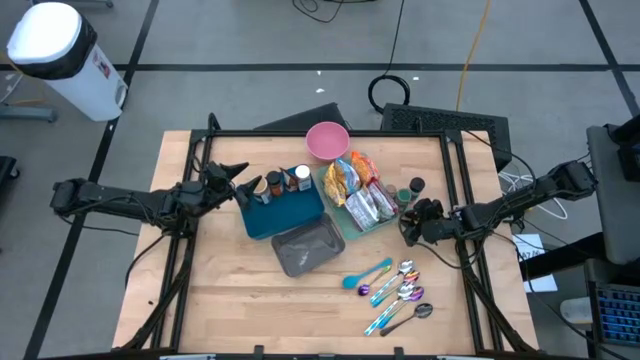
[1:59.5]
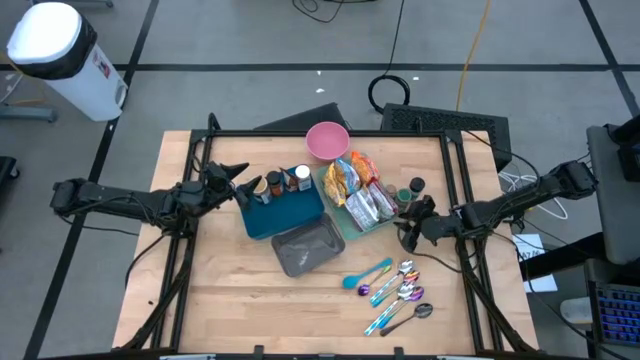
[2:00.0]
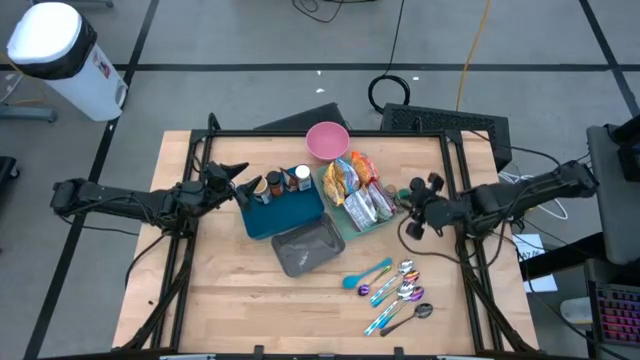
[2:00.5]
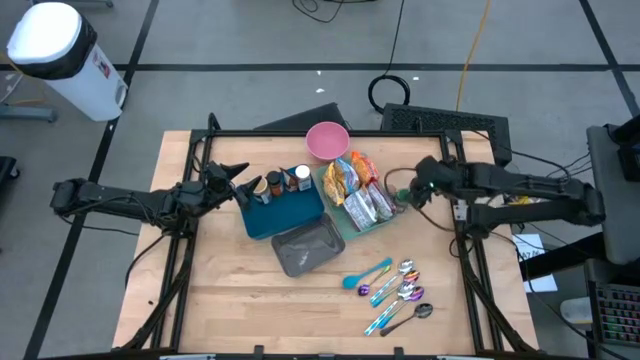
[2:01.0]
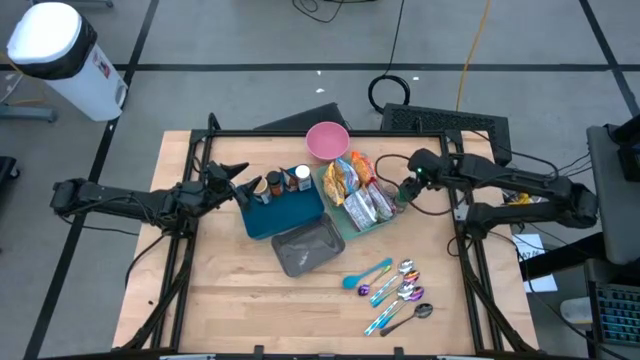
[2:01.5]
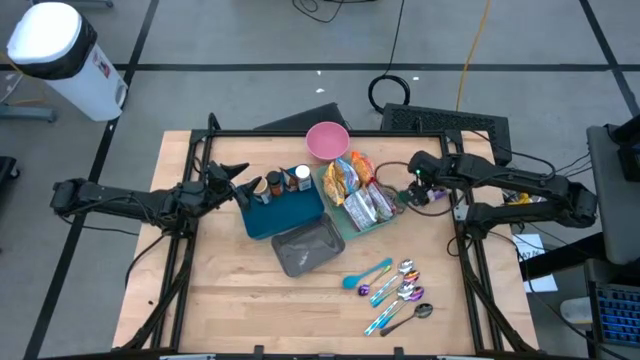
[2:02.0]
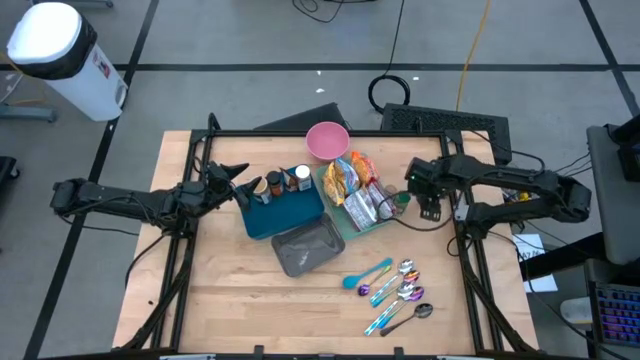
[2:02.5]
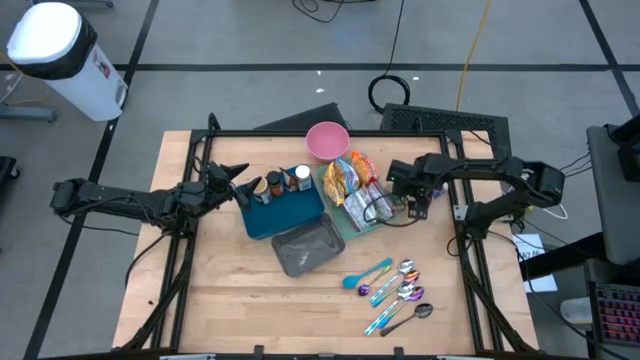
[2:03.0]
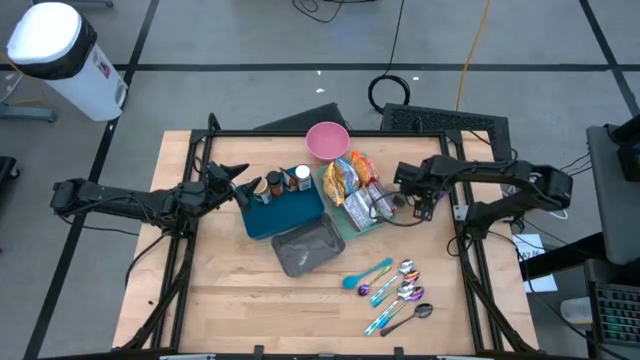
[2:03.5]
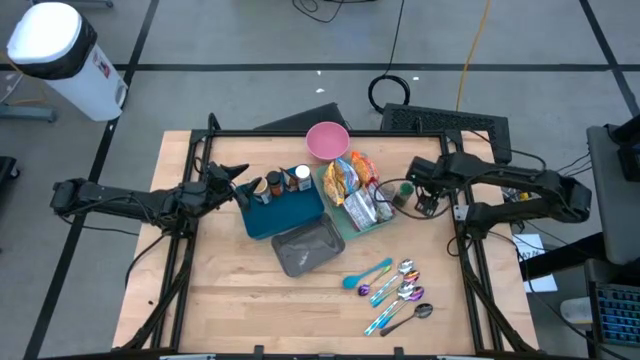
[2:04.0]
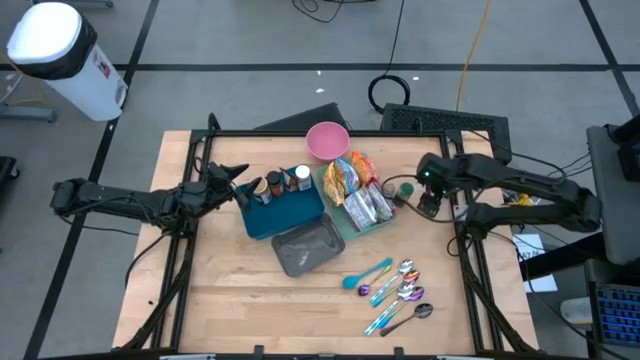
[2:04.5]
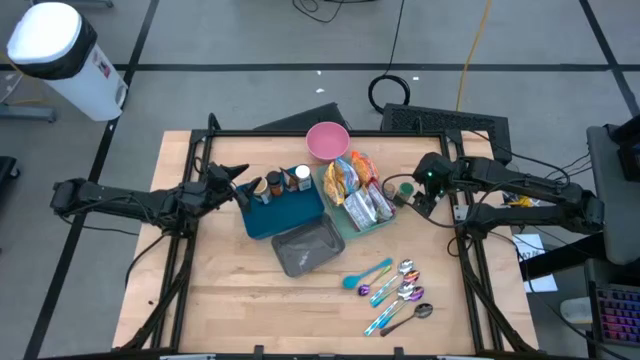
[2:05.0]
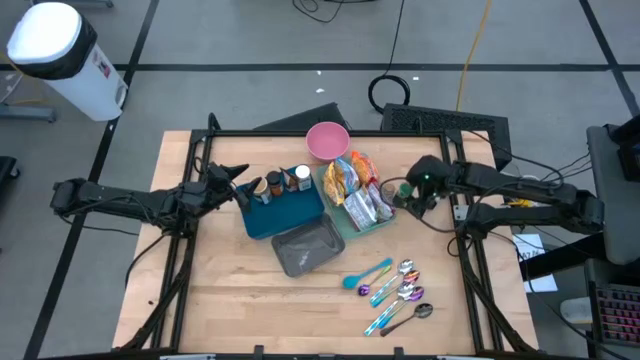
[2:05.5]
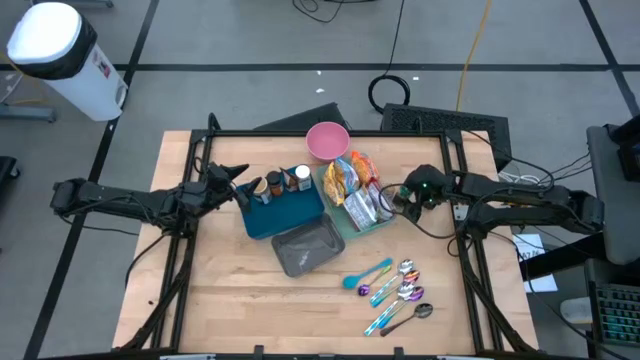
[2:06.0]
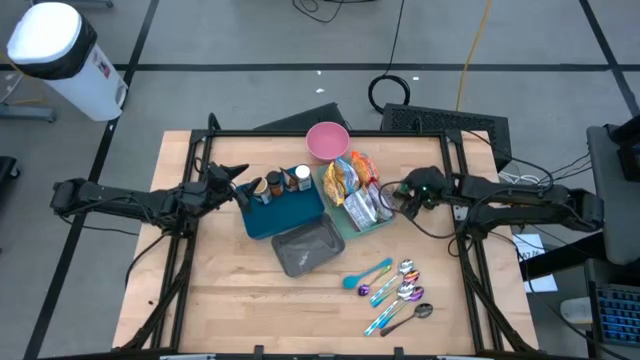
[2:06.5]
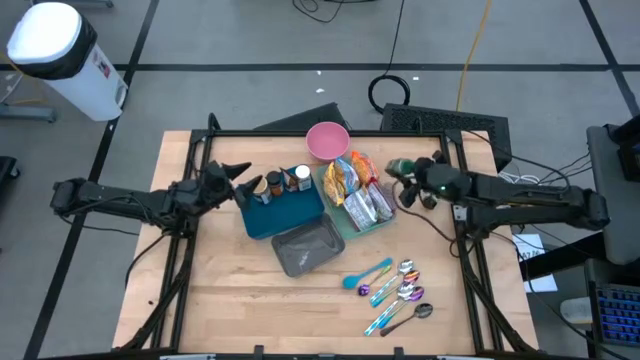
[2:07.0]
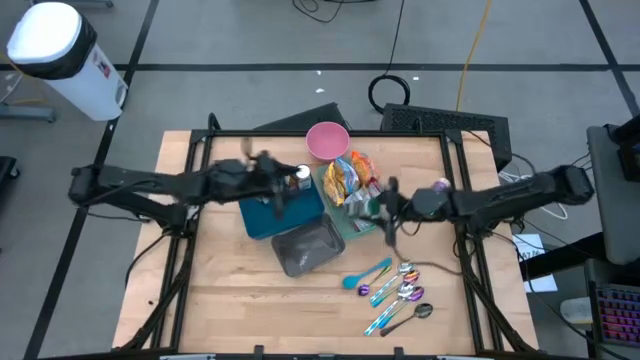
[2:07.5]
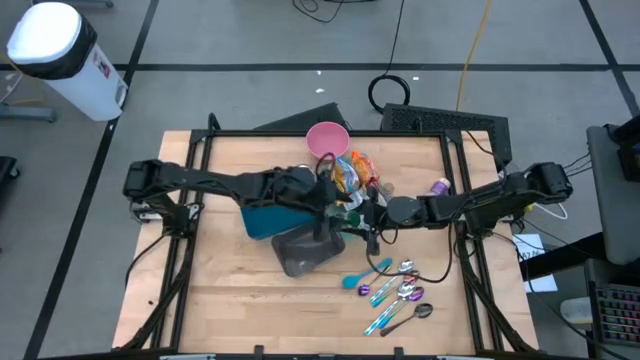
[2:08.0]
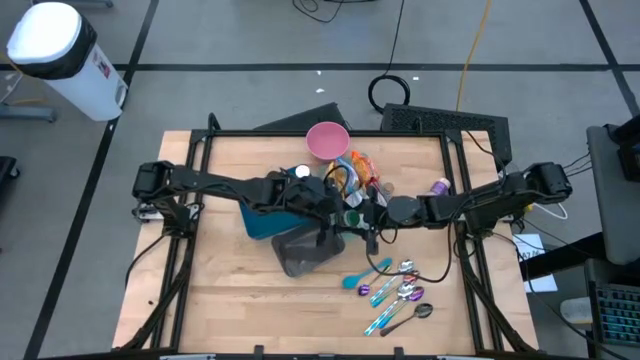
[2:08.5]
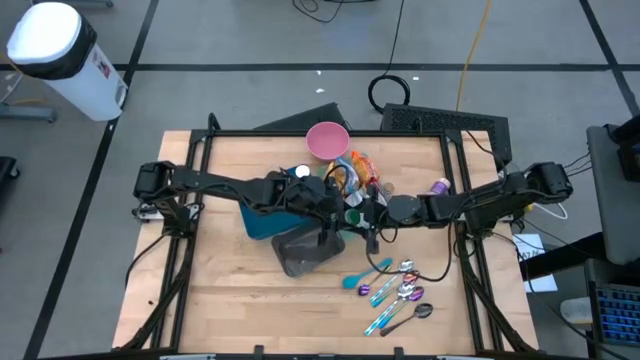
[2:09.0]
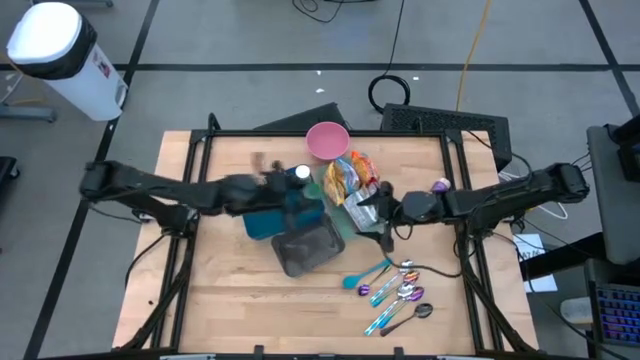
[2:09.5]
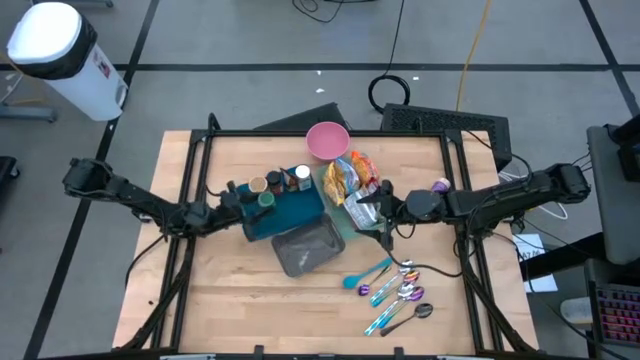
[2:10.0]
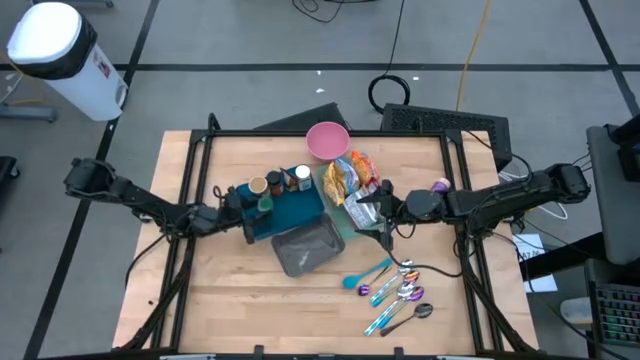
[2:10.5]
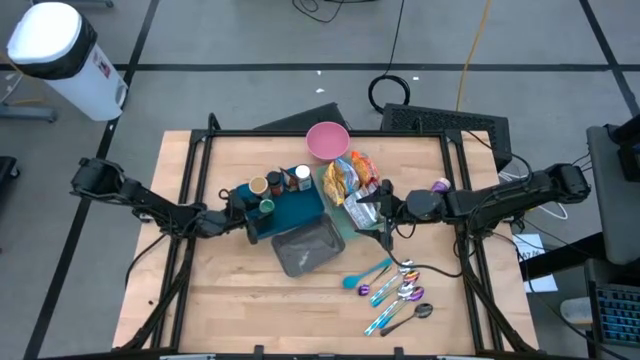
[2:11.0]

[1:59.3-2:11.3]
Task: Pick & Place Food Item
Put the green seasoning bottle into the blue bin

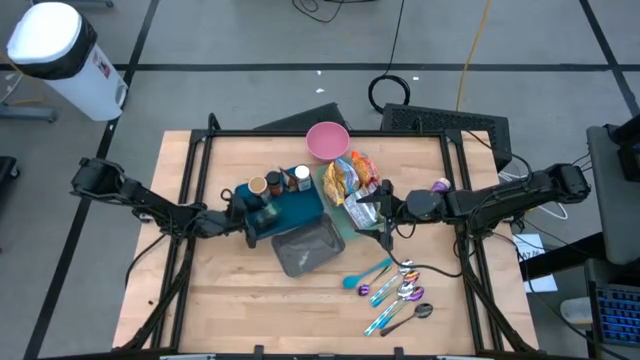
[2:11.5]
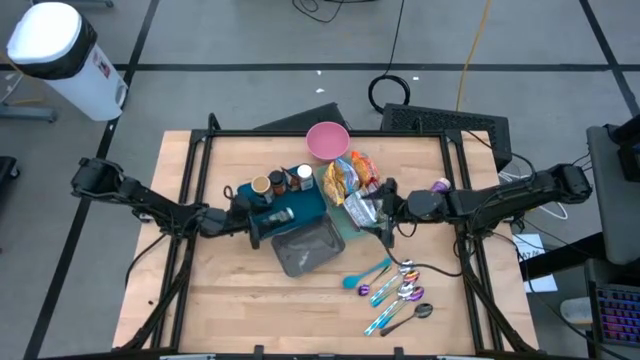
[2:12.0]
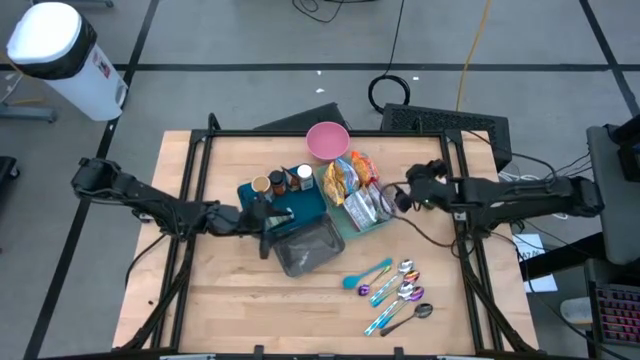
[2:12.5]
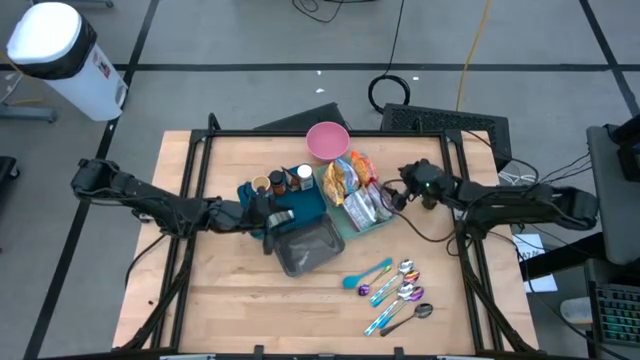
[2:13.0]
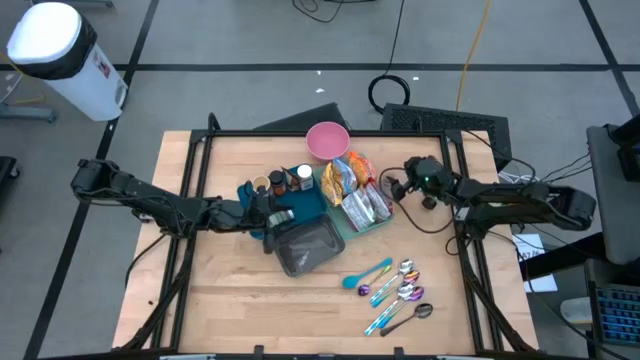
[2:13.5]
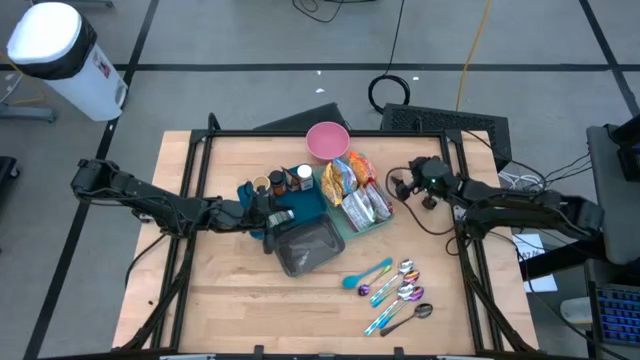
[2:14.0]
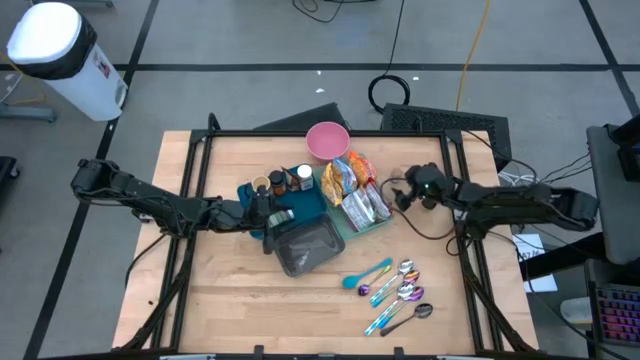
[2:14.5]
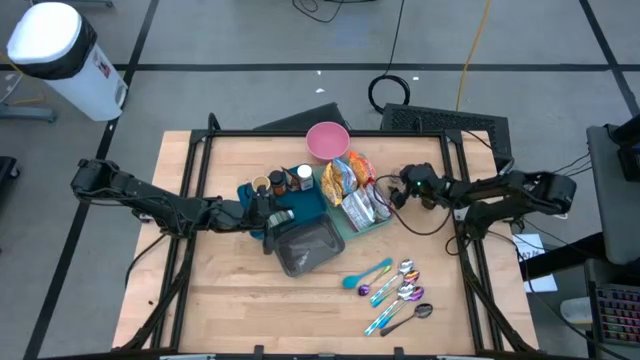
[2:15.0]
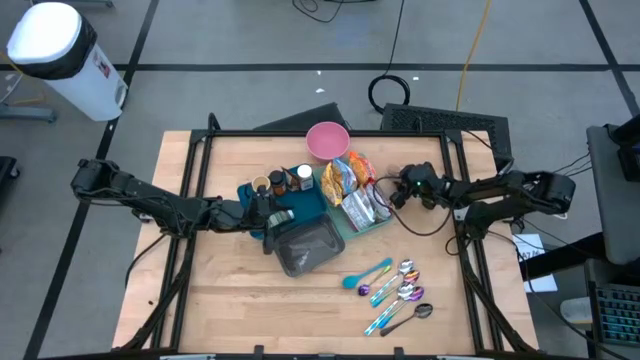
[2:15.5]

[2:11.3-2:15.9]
Put the brown seasoning bottle into the blue bin

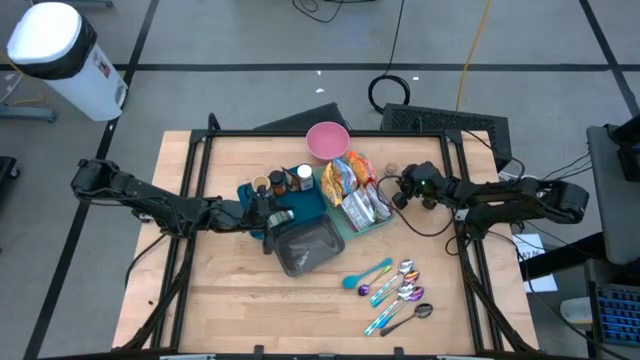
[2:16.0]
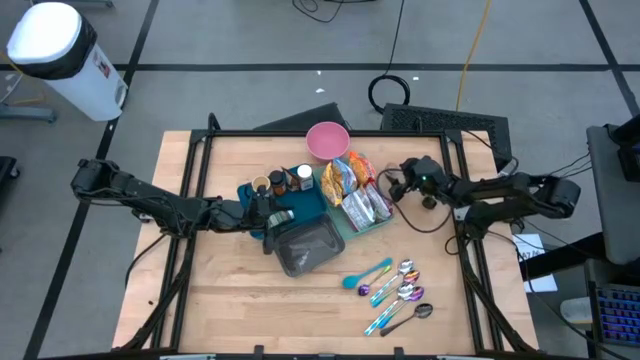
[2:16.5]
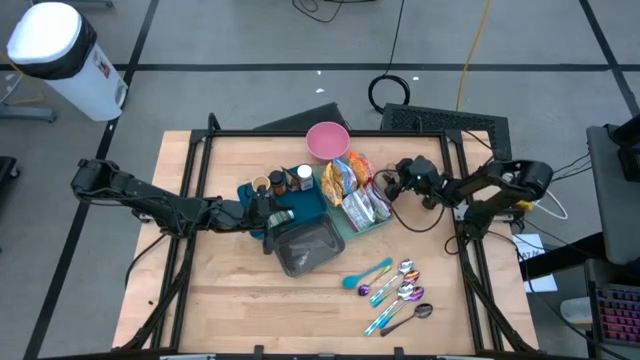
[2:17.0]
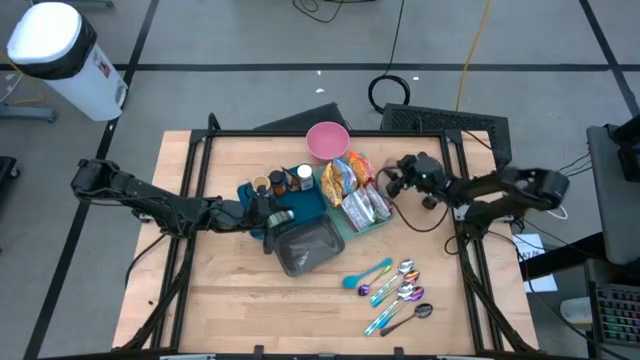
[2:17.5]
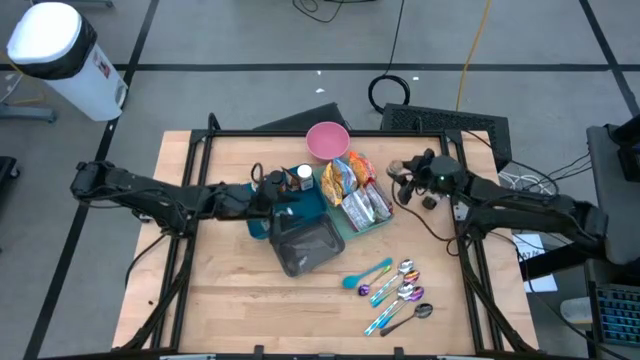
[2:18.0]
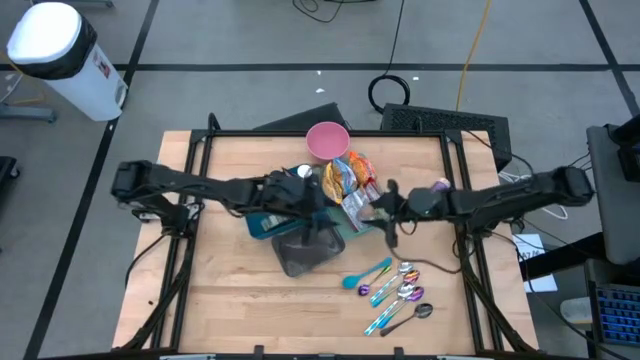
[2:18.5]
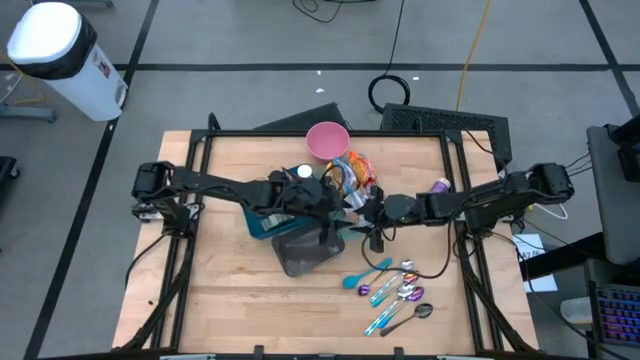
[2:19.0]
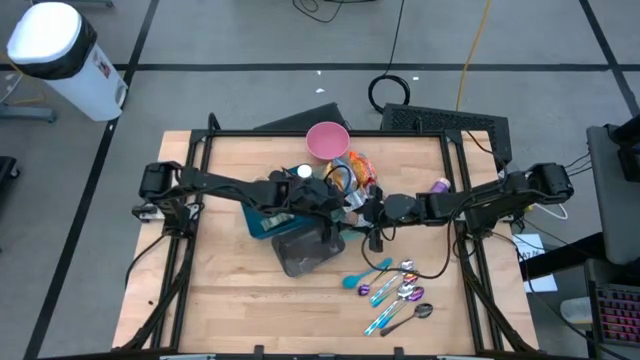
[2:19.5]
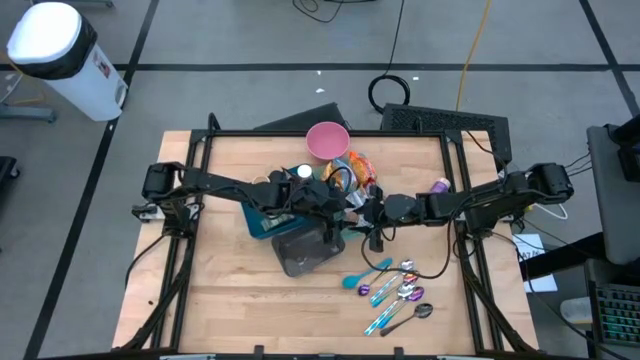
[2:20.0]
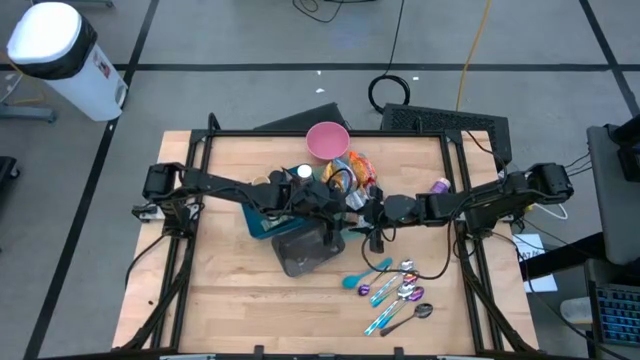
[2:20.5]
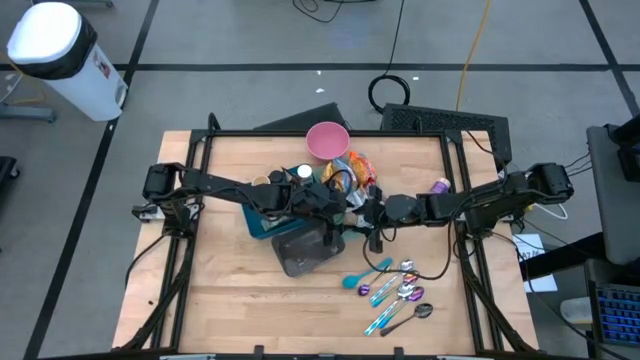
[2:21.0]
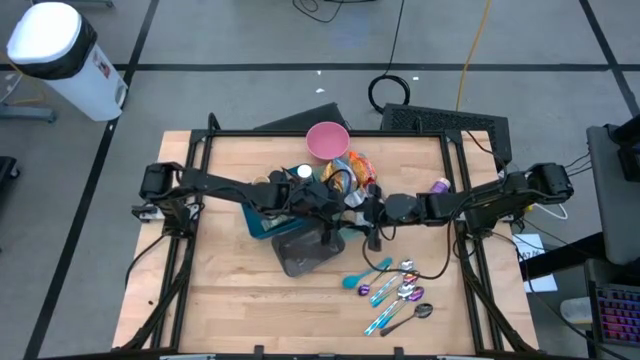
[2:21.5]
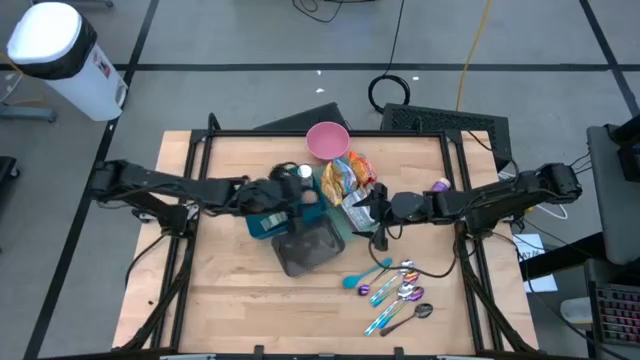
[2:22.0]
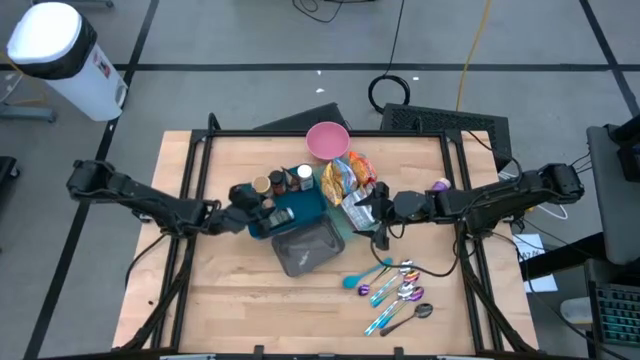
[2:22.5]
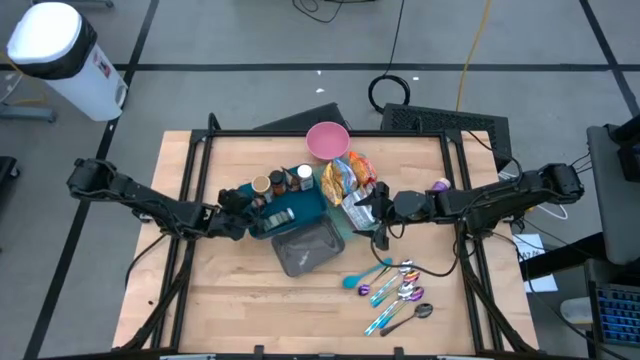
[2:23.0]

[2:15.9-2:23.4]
Put the brown seasoning bottle into the blue bin
